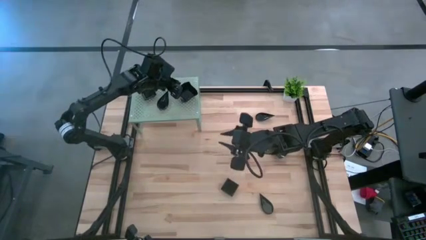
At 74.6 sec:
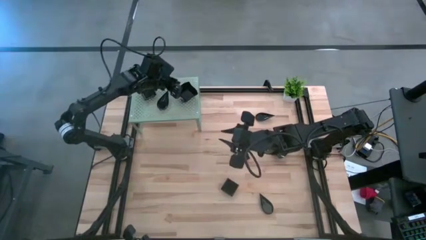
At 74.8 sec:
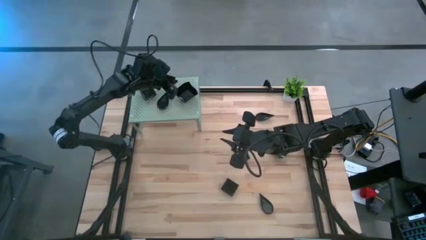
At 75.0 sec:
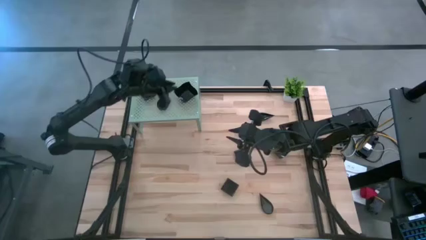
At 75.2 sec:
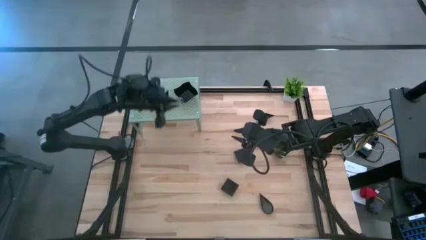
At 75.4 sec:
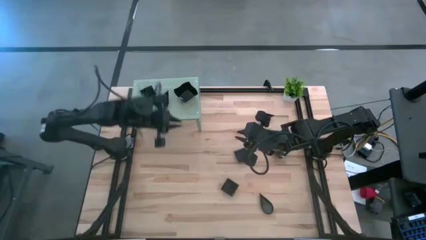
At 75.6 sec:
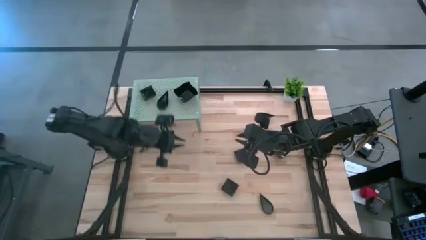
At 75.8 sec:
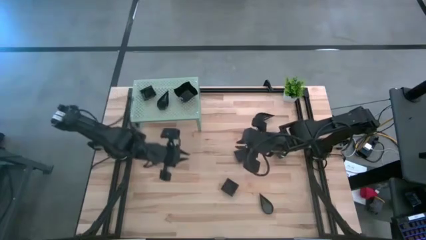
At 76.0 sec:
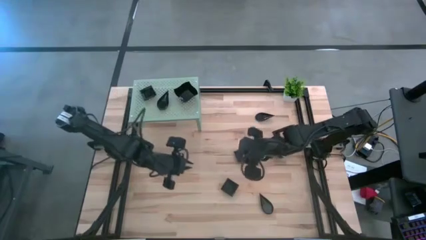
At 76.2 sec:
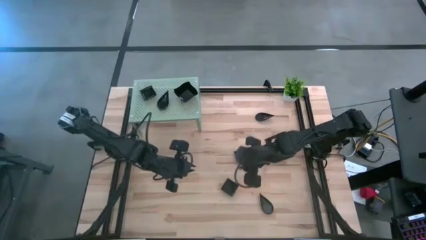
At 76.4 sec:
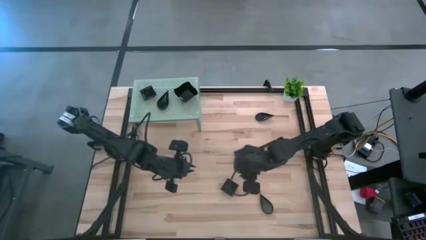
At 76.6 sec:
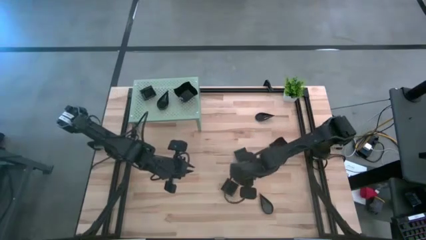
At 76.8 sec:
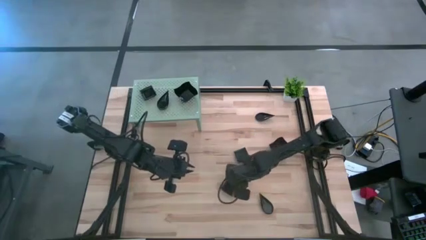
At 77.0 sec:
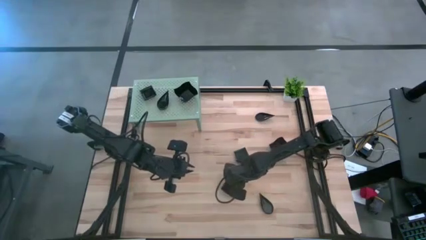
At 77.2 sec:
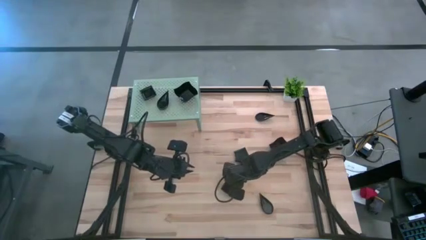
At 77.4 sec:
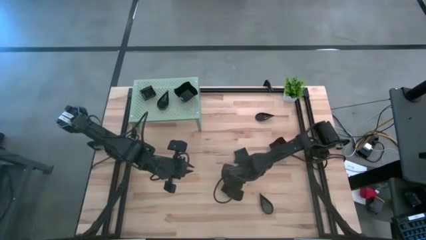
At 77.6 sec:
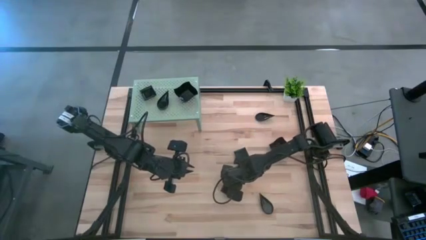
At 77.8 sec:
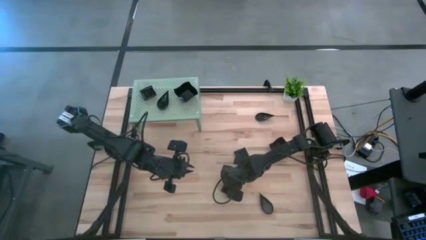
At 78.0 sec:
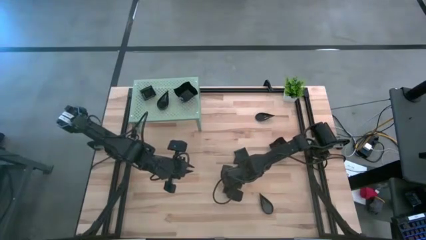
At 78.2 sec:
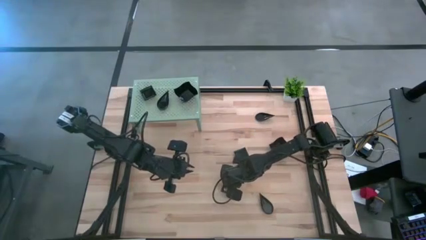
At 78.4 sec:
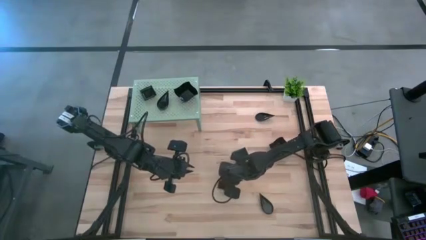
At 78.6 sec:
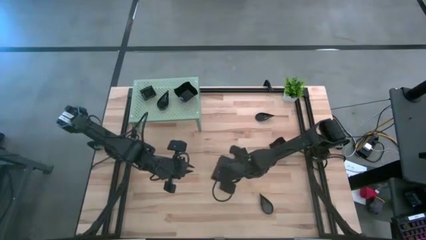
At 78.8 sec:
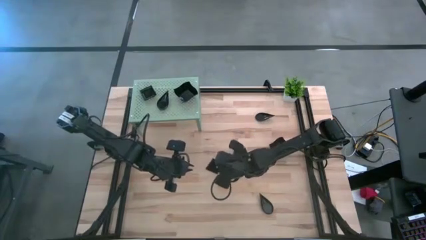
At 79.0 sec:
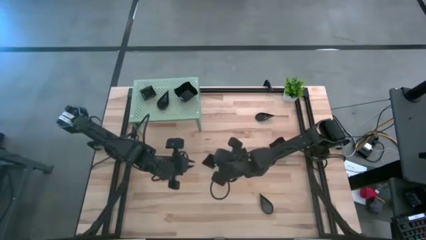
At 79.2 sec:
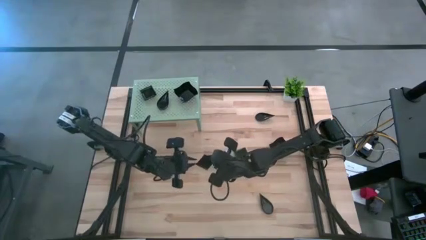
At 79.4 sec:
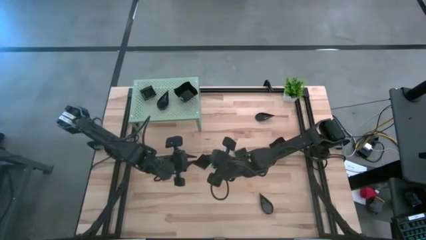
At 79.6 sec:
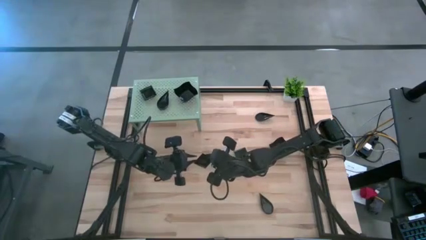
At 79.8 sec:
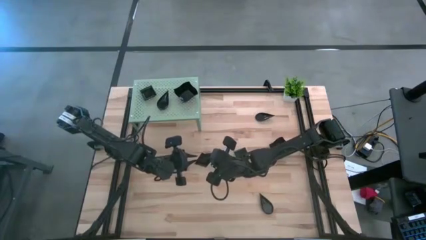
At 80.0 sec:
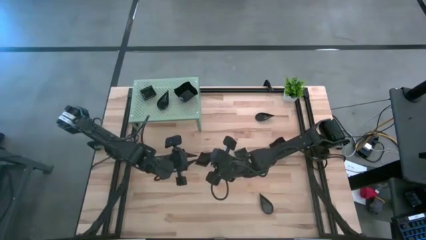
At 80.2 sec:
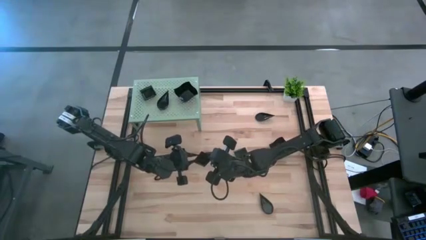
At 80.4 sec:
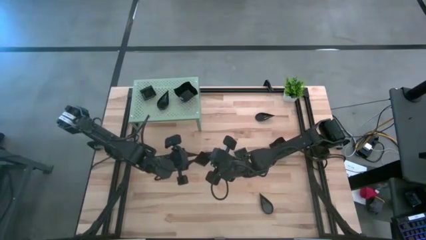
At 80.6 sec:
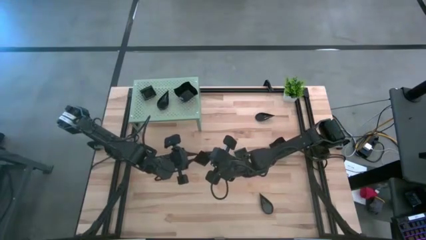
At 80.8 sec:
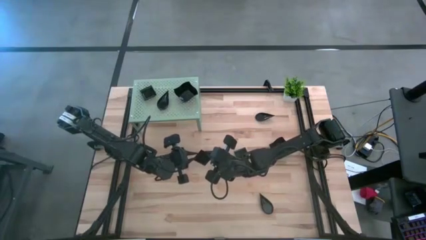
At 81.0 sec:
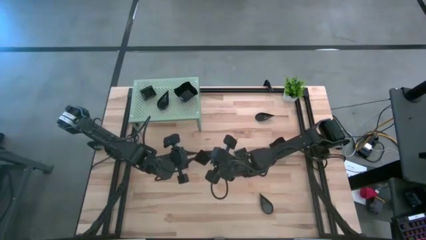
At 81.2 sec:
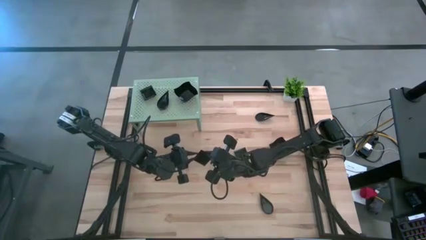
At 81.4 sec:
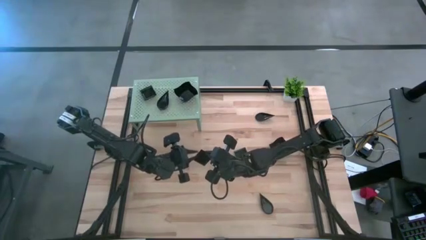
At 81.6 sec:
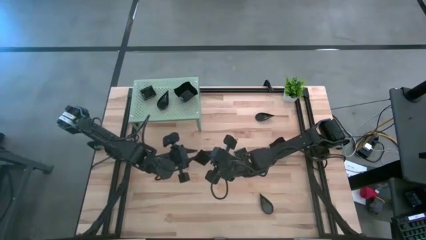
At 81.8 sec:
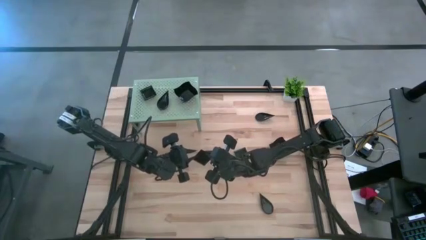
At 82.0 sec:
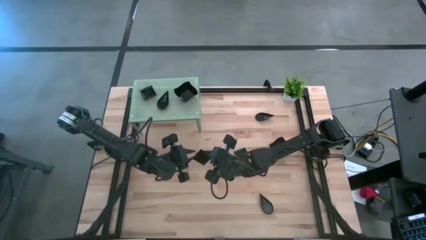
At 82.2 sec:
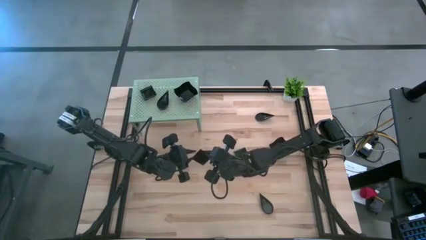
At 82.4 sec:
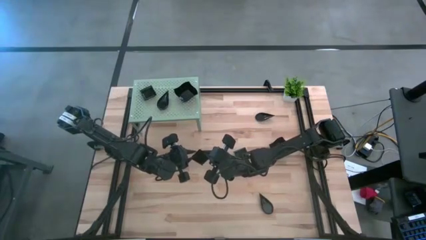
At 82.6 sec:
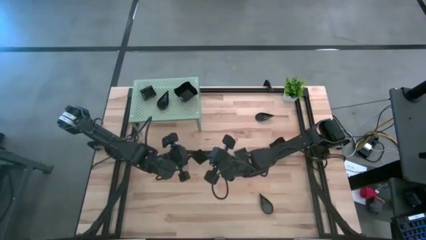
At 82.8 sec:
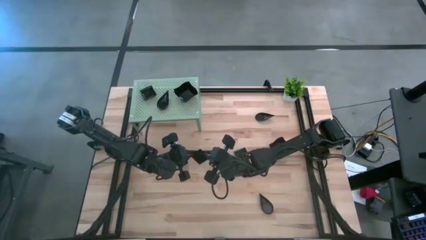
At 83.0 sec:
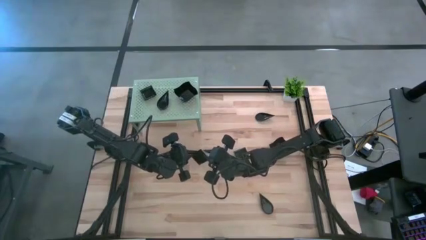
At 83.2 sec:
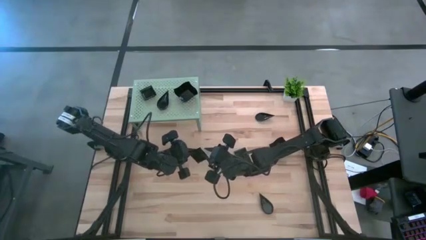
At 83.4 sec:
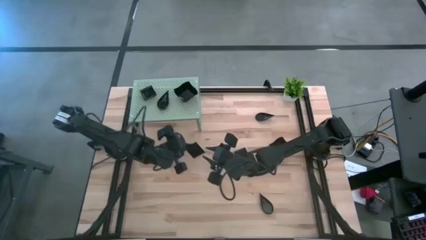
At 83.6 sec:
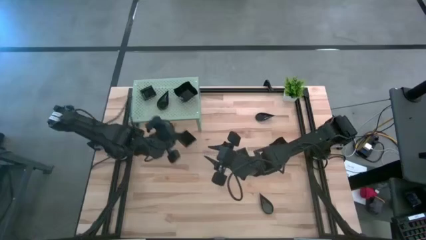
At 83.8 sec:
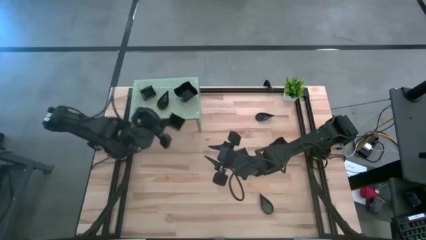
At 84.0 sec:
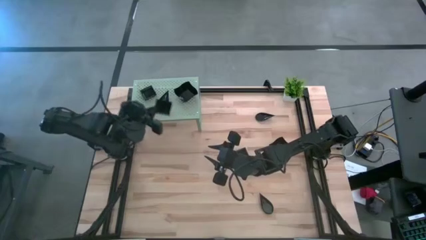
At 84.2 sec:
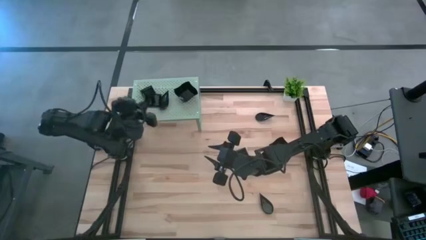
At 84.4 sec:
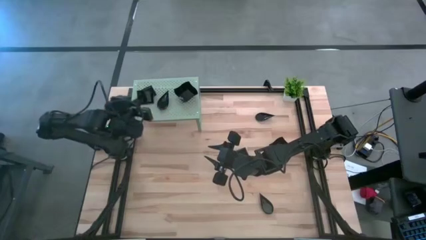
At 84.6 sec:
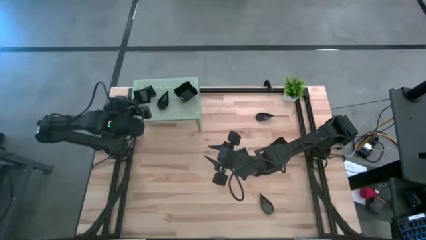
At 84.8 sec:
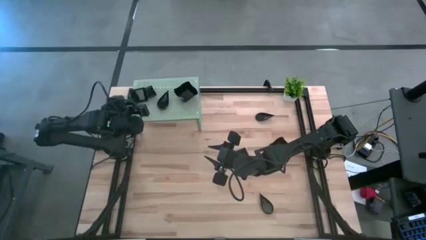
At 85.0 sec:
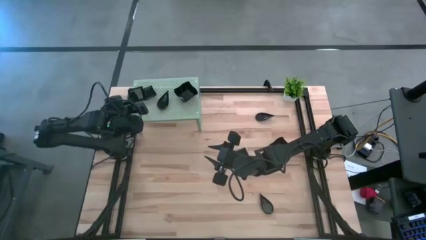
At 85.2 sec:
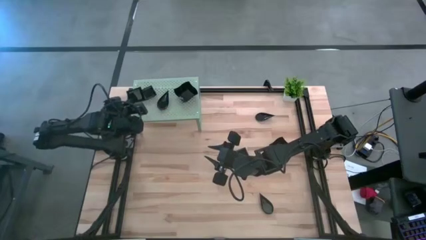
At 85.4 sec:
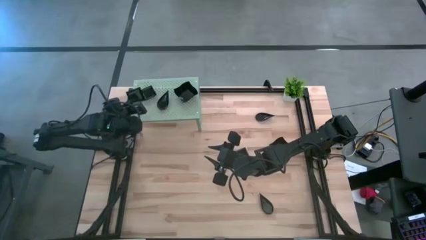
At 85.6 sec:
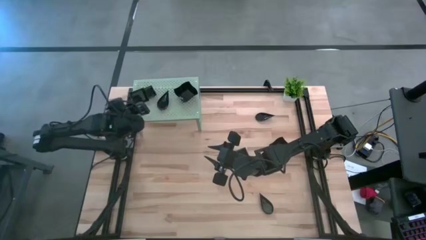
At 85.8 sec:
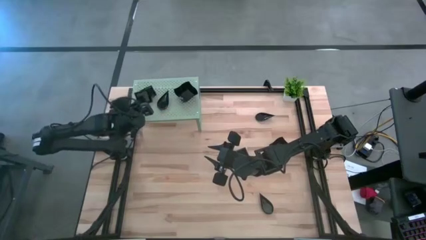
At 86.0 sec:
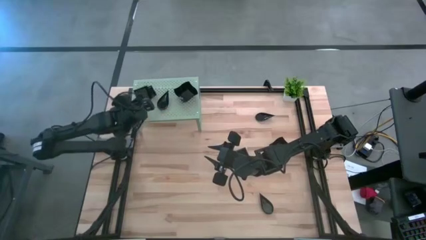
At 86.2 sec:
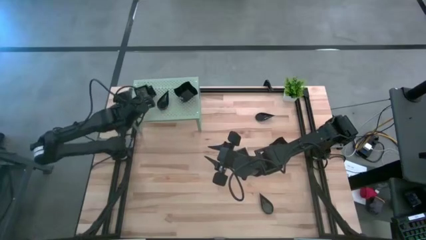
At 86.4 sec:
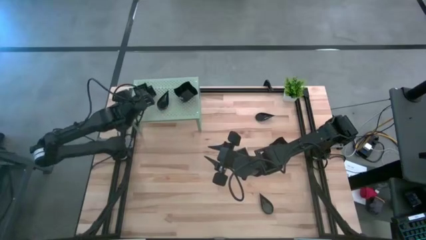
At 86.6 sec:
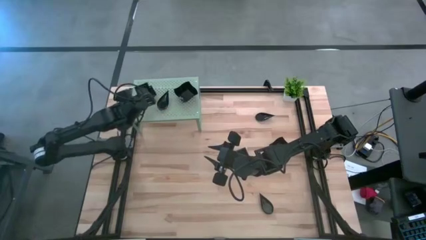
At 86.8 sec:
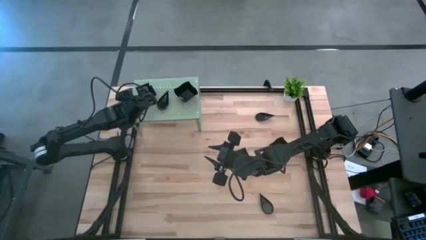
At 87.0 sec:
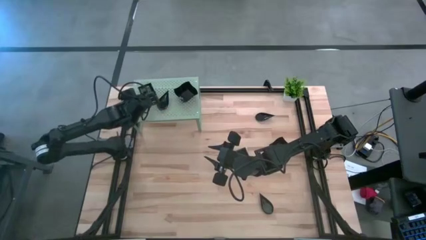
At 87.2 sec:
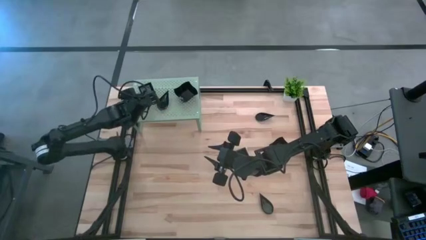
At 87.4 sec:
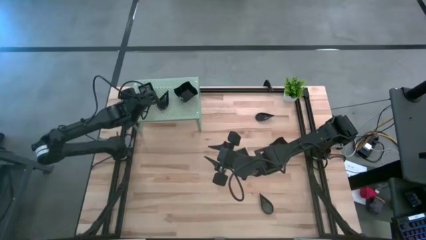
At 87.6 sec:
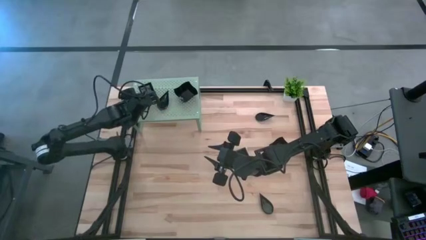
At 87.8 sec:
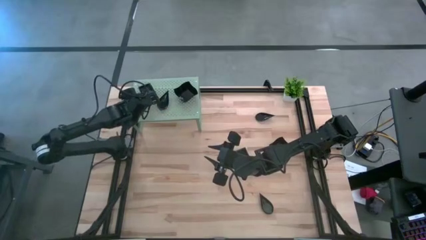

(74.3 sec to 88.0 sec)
Task: Pick & Place Mini shaped plates
Stack the black square plate on top of the black square plate on the shelf
